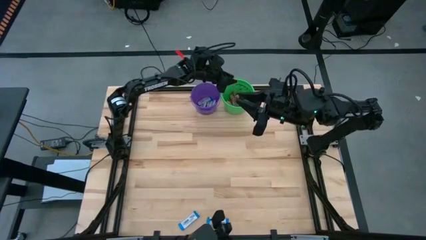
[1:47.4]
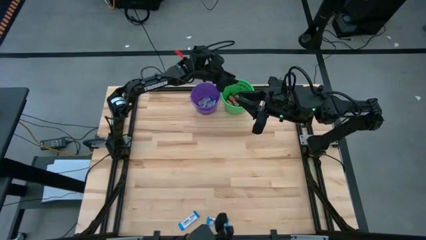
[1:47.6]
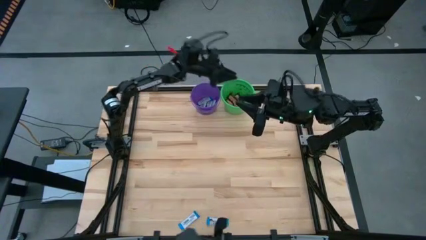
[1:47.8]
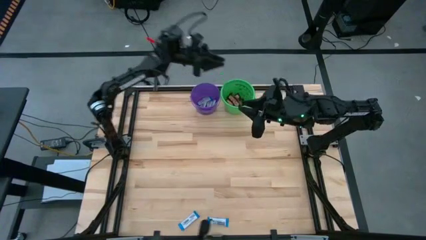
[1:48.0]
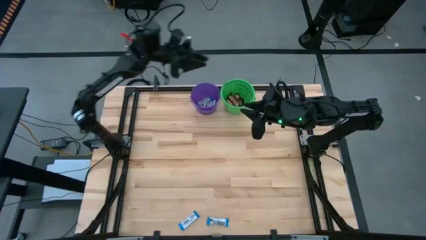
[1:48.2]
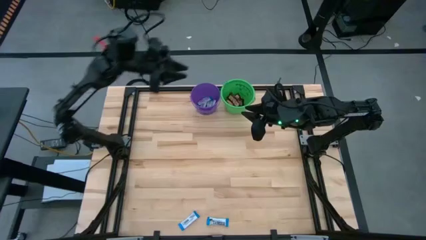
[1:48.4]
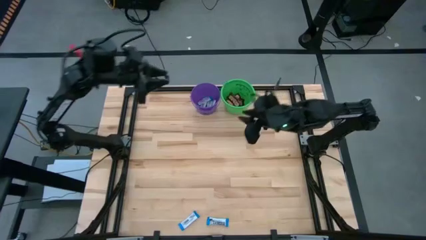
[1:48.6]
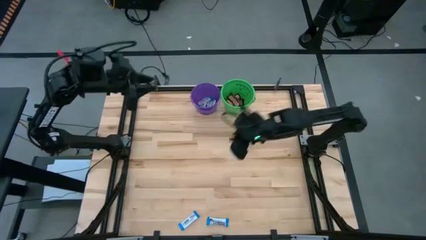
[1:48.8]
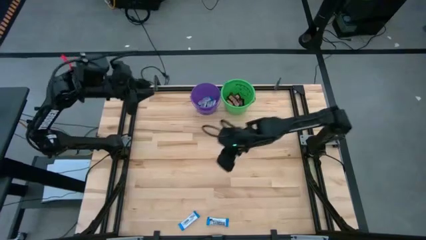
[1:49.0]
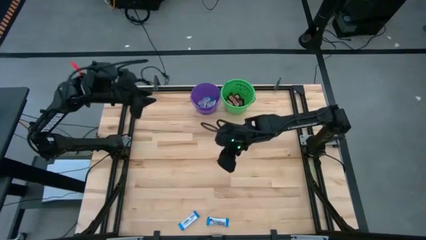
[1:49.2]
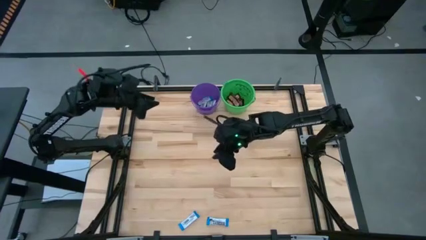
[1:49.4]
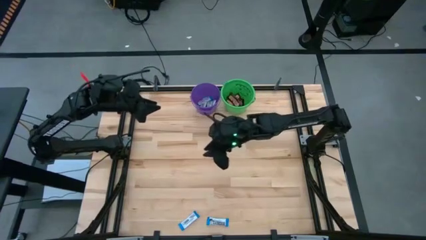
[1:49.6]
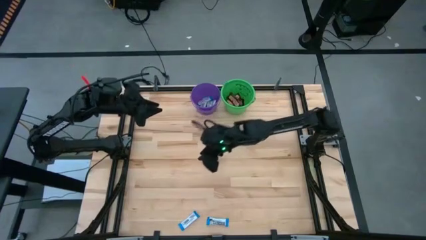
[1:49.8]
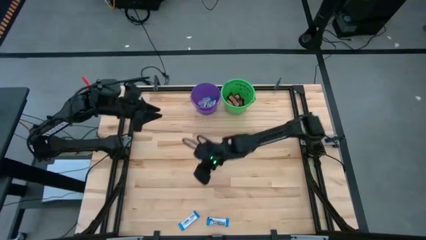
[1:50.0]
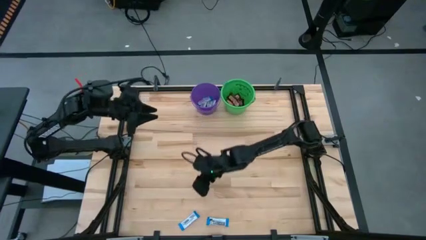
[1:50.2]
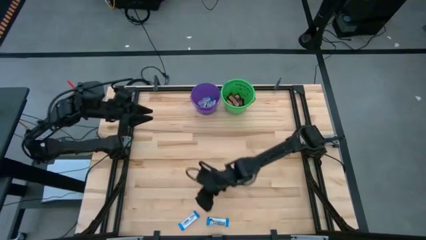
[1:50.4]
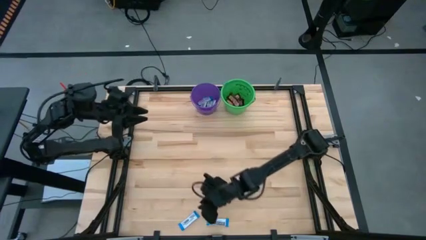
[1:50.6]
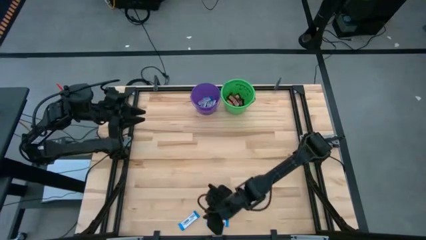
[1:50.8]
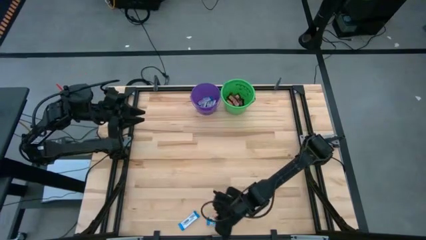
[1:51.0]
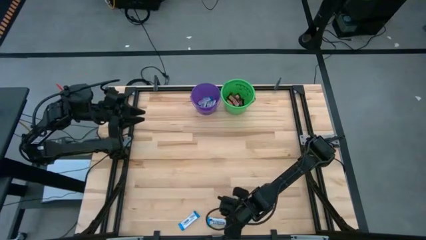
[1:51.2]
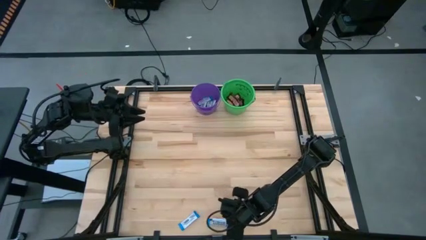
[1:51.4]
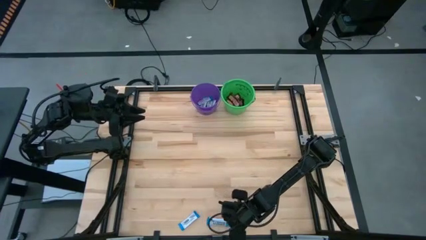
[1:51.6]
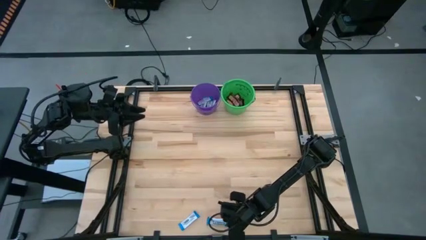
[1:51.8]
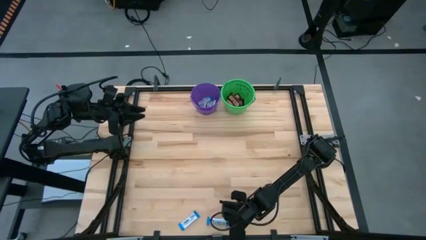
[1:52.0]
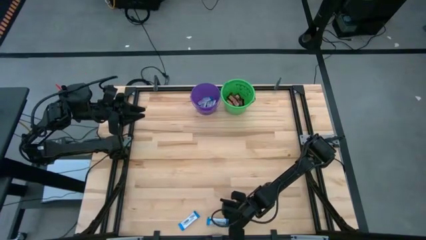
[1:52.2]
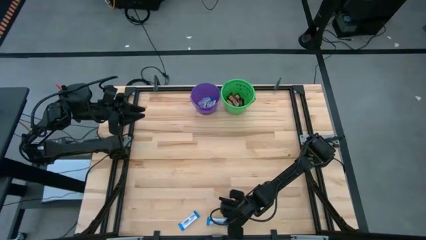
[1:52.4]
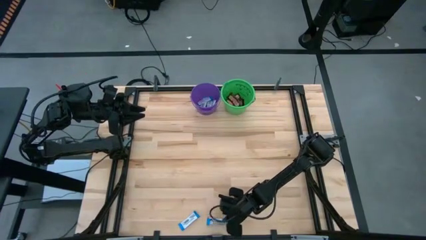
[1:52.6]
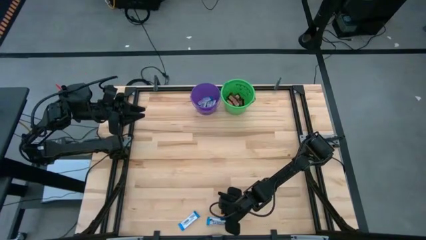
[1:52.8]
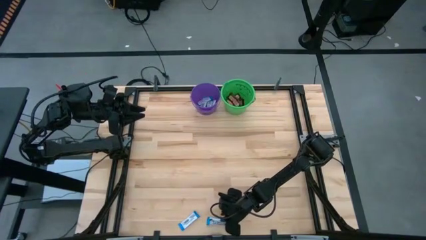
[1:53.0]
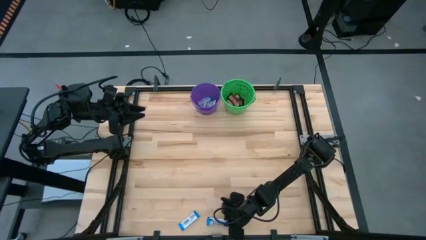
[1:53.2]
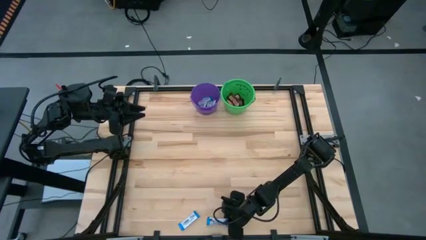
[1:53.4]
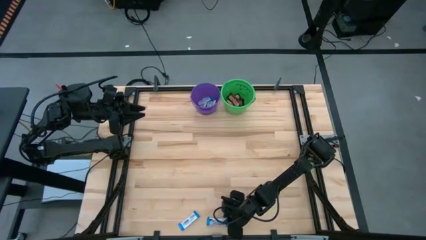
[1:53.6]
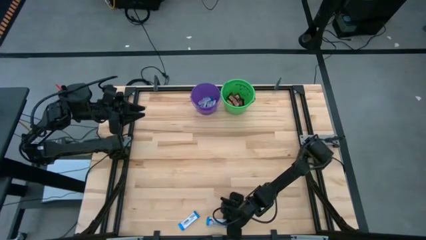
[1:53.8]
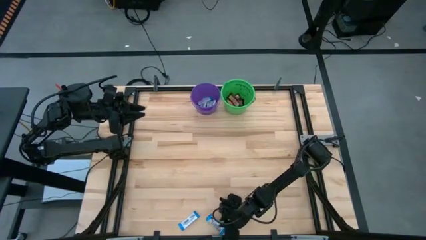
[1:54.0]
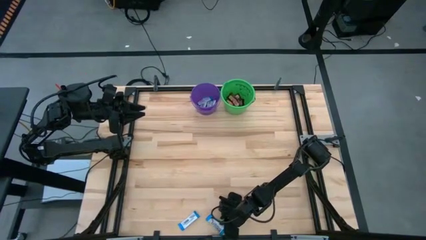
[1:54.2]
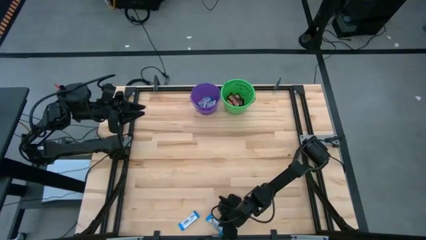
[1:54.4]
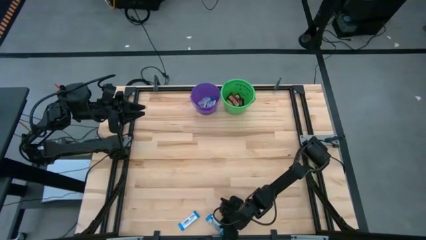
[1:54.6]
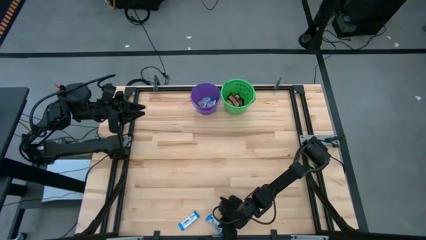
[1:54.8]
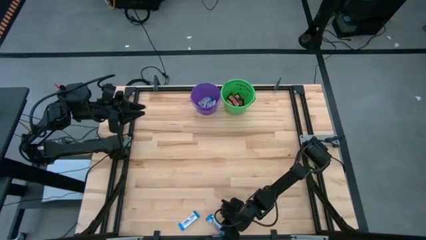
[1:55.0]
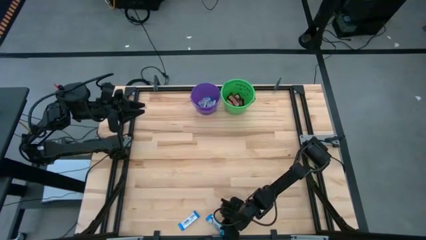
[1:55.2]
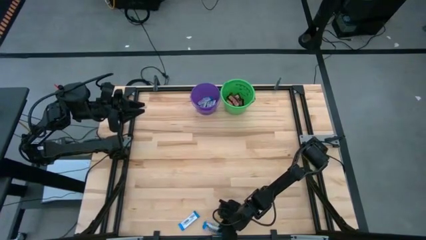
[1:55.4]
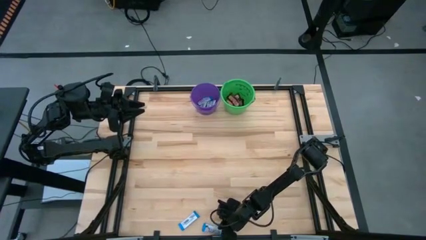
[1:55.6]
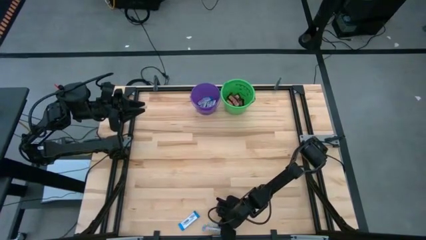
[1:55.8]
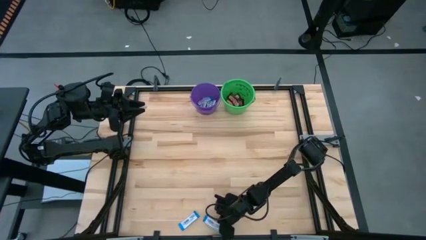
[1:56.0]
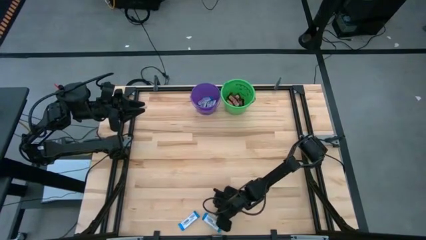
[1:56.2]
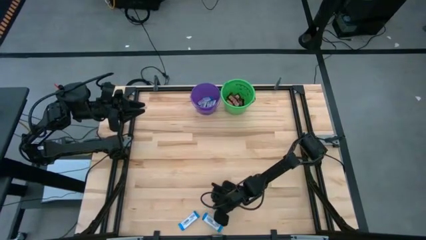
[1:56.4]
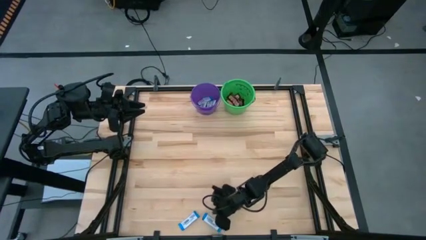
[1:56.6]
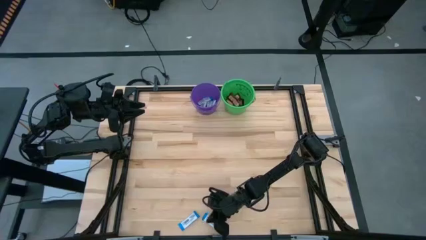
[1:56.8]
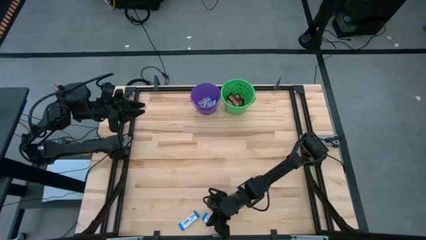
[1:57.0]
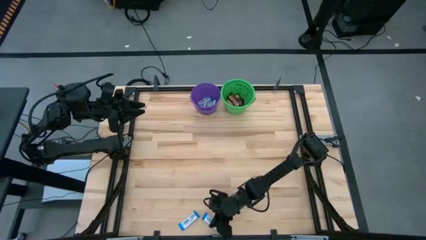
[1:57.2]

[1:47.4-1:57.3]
Task: Sort candy by brand, put in halloween buckets
Put the white chocolate bar into the purple bucket
